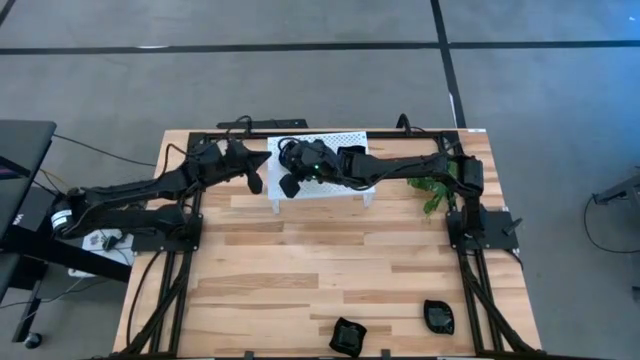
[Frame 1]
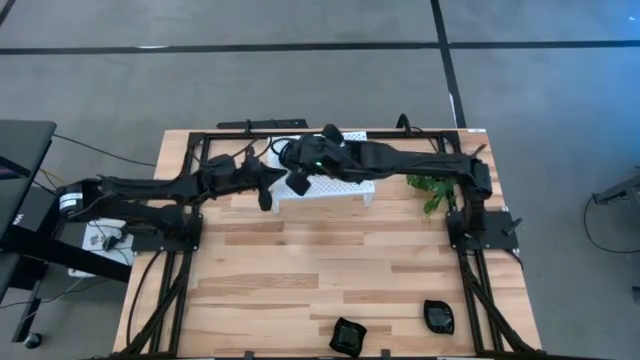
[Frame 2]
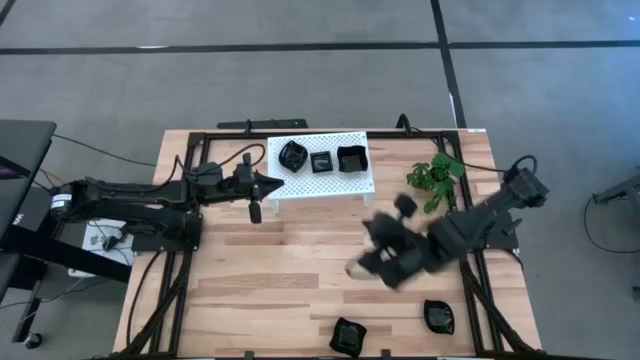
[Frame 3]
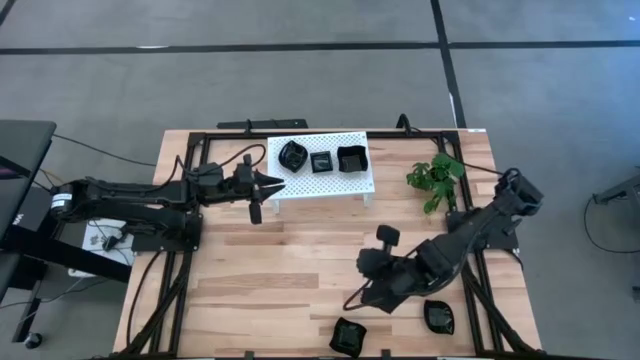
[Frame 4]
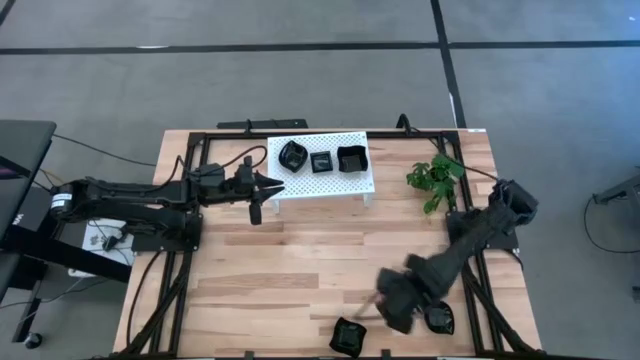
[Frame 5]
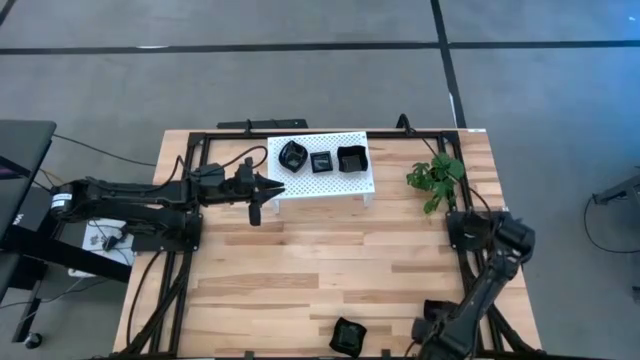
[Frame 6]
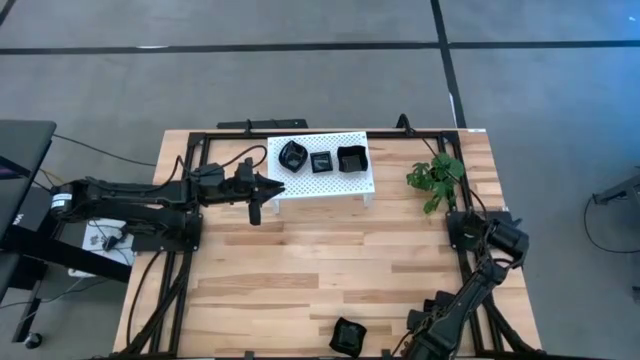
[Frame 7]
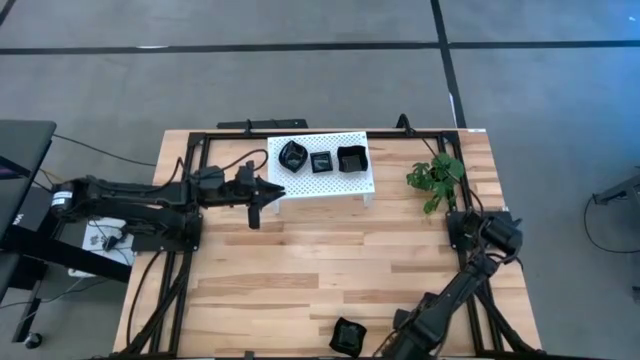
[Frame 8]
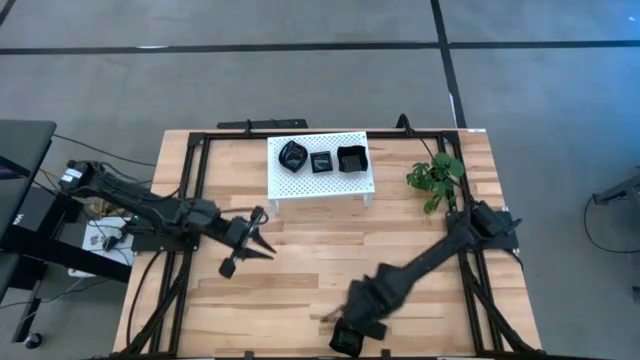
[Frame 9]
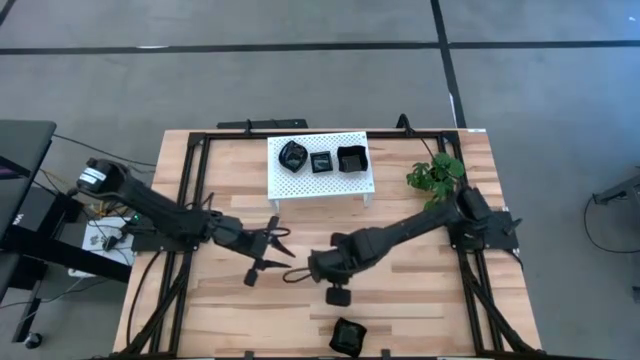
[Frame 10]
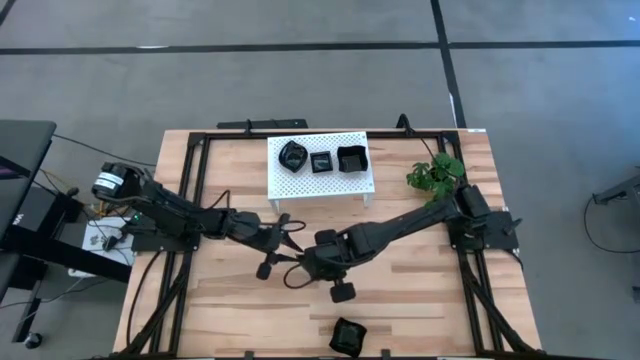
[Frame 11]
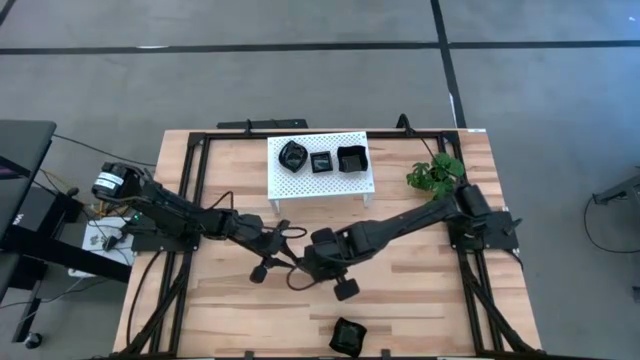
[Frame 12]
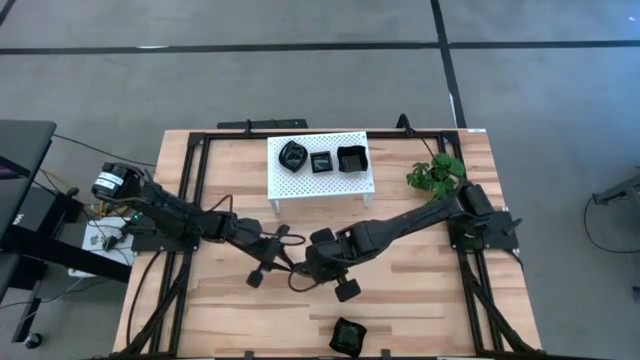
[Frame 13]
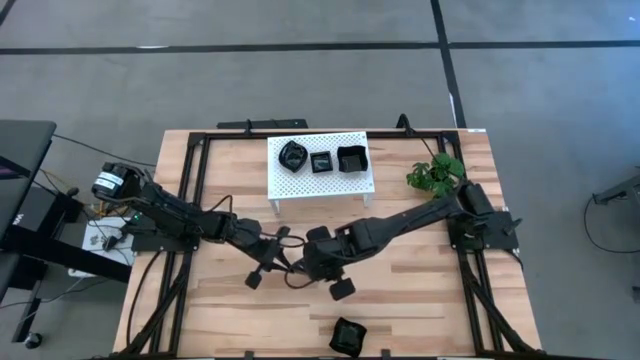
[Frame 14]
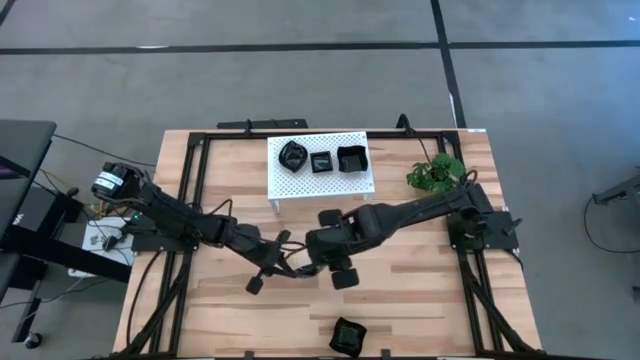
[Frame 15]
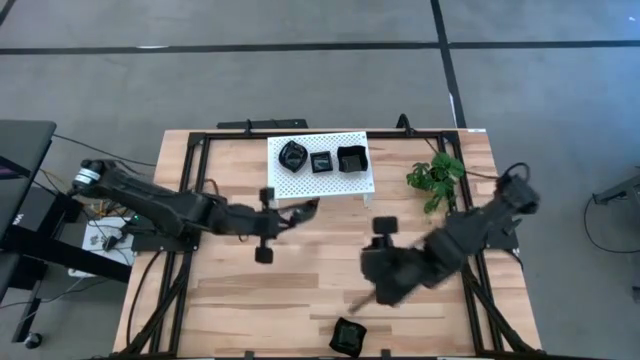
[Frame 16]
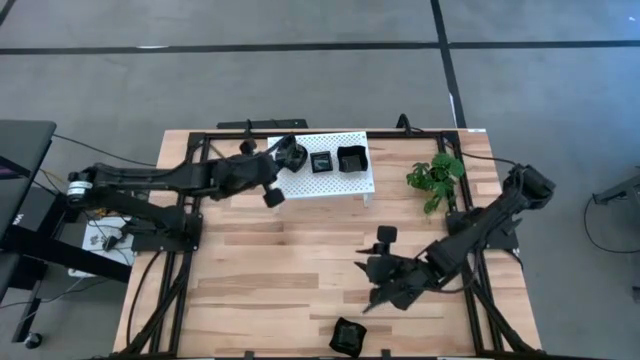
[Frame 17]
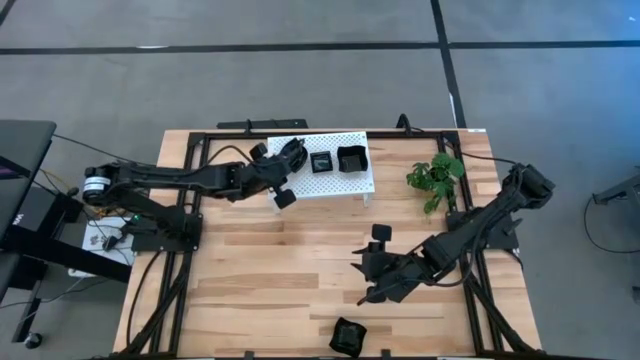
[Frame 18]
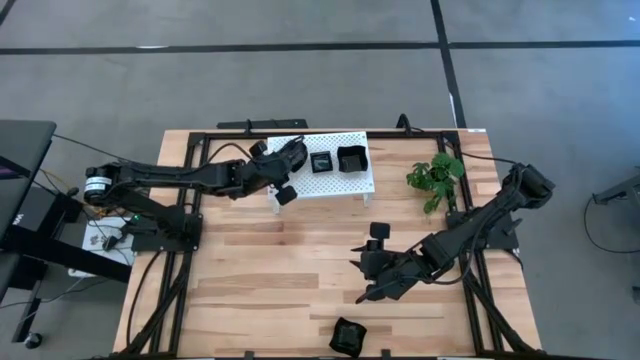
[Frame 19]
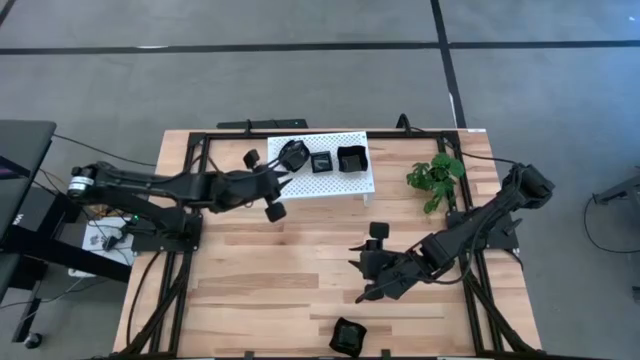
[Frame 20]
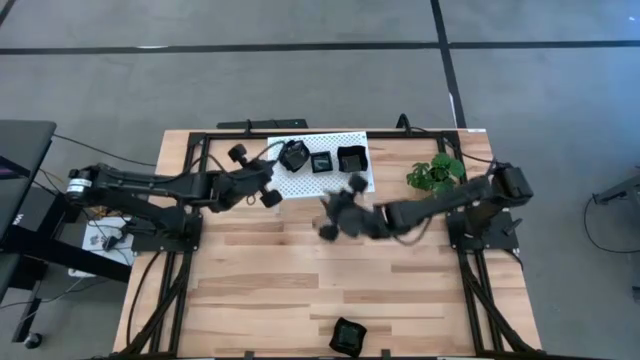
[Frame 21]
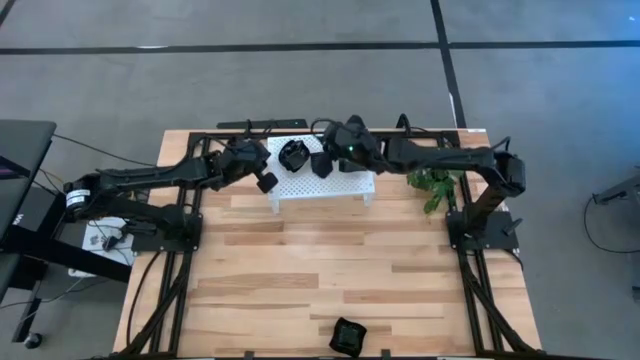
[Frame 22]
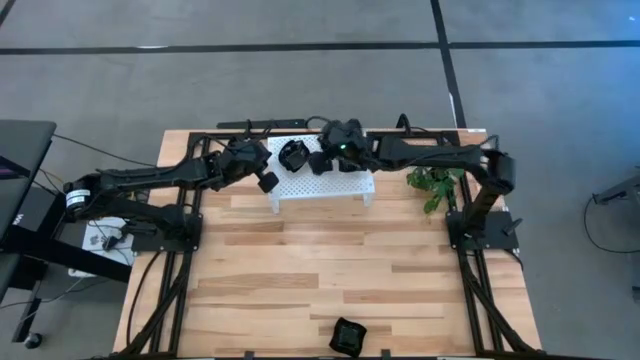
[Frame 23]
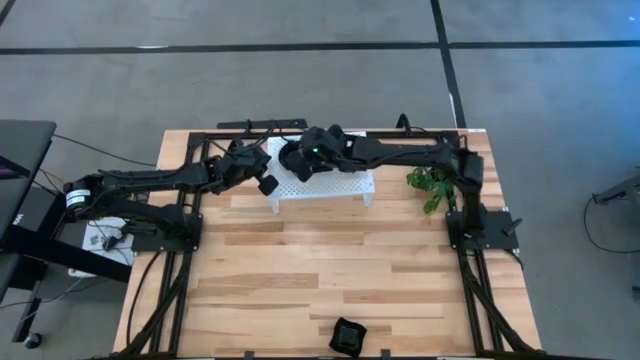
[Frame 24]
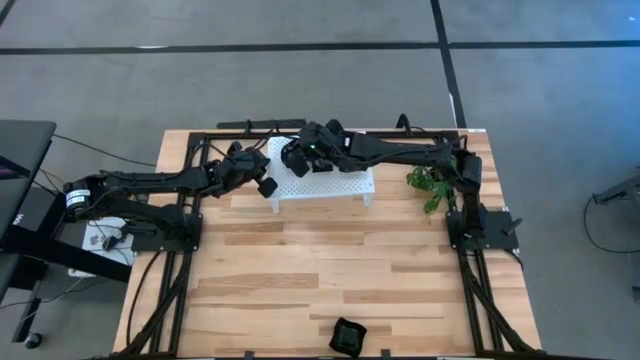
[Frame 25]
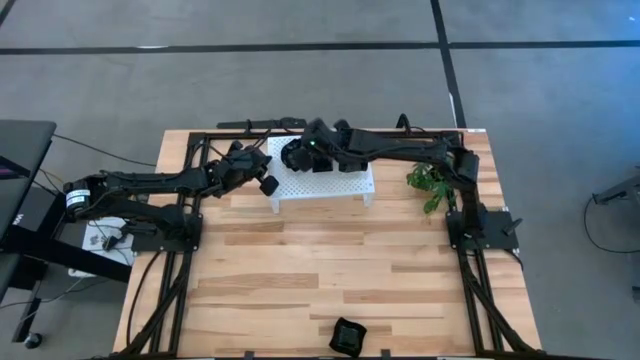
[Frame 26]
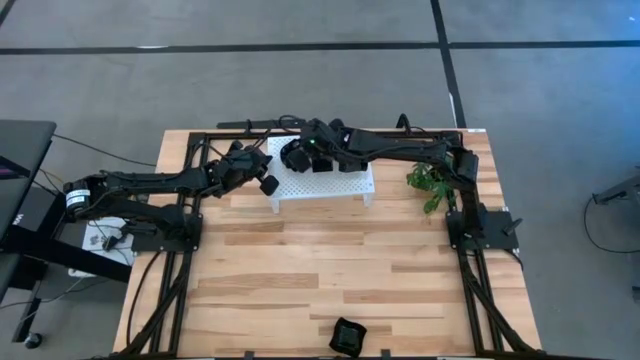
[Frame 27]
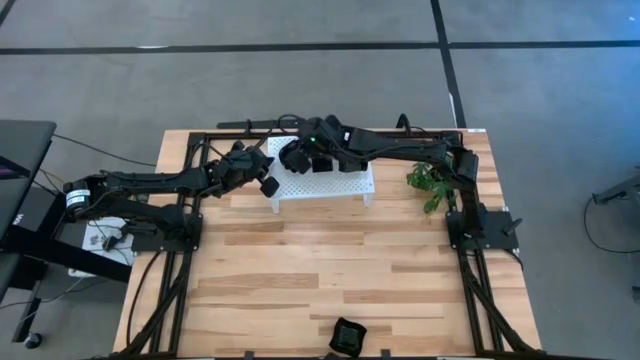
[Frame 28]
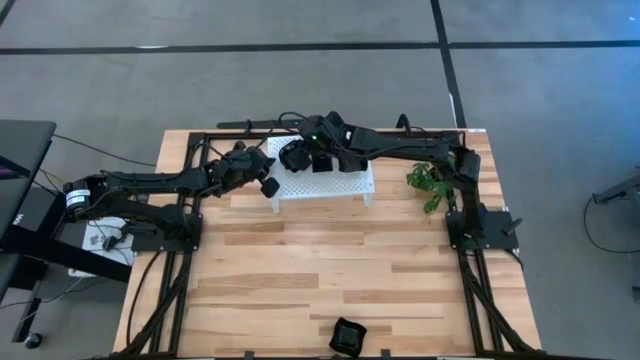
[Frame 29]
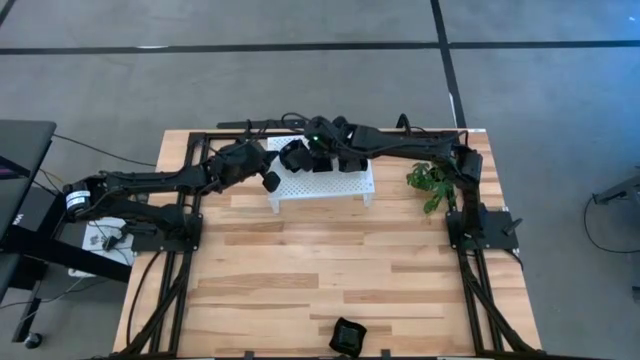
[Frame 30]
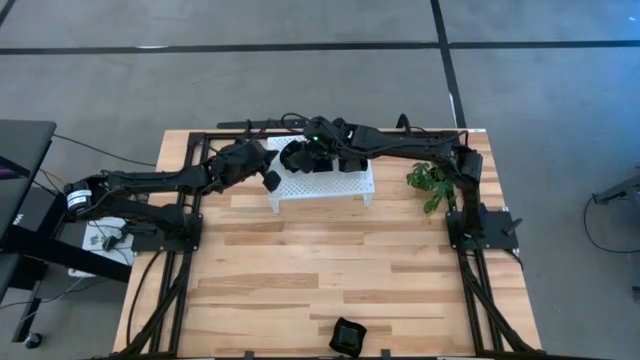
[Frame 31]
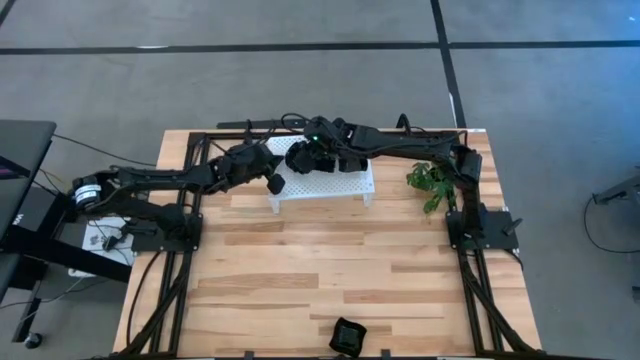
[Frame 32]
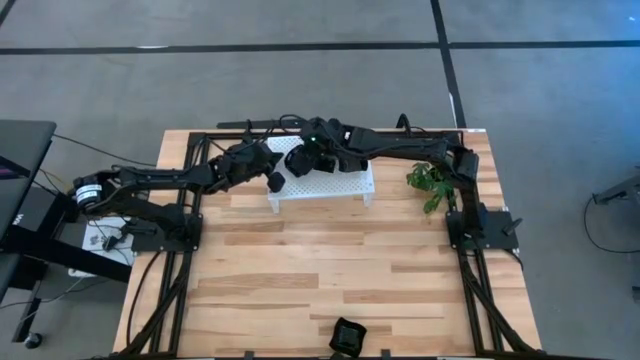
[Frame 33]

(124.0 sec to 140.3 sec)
Task: Pick & Place Mini shaped plates
Stack the leaf-shaped plate on top of the leaf-shaped plate on the shelf

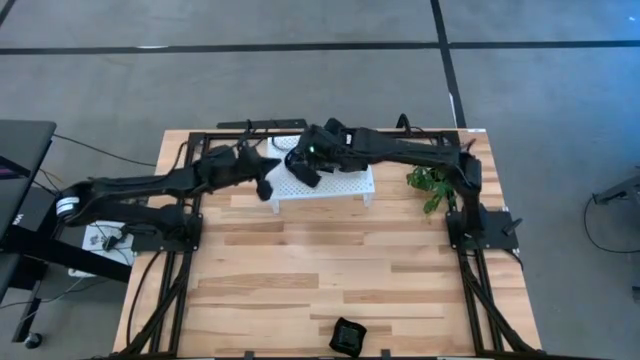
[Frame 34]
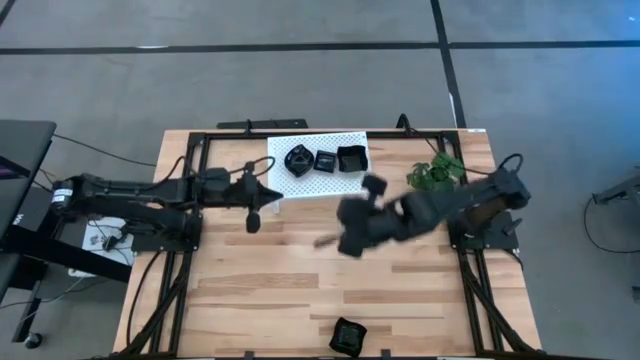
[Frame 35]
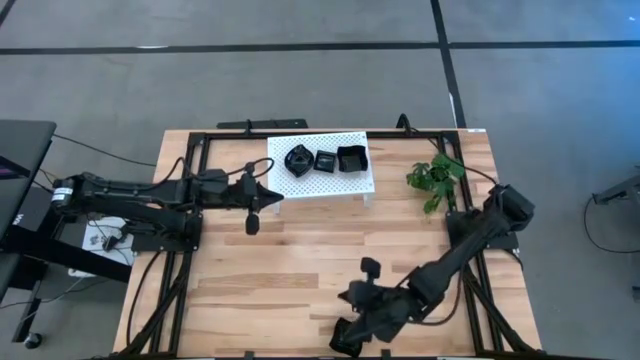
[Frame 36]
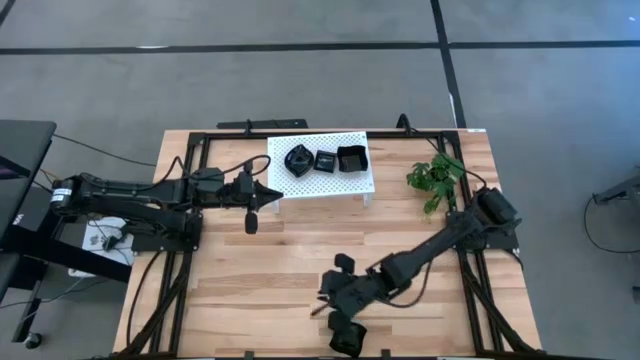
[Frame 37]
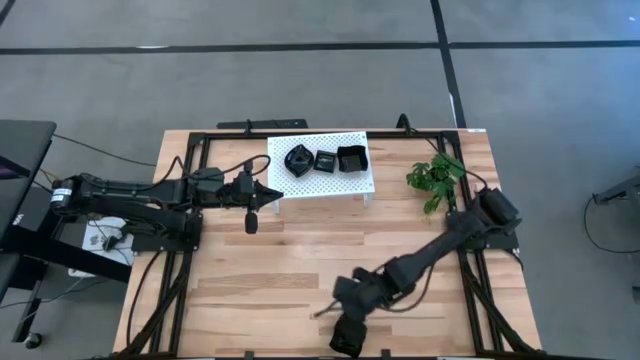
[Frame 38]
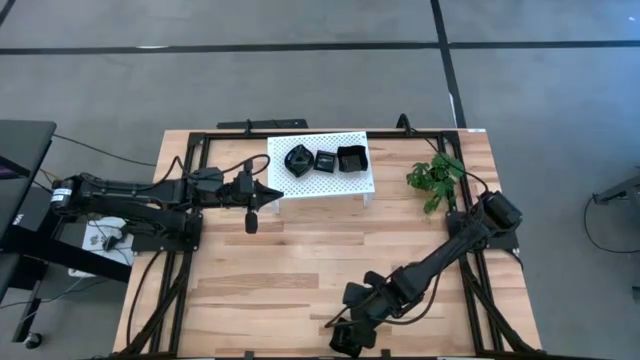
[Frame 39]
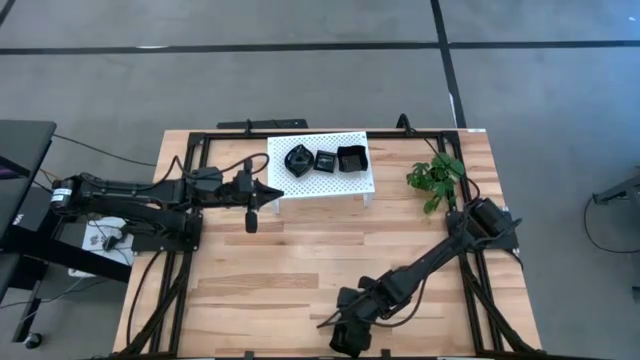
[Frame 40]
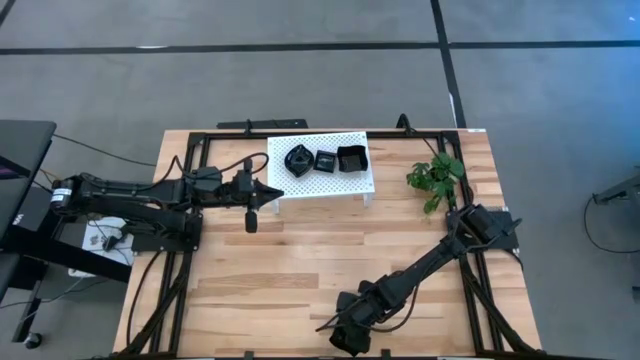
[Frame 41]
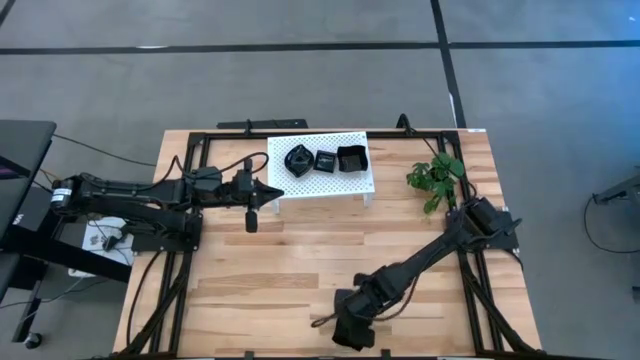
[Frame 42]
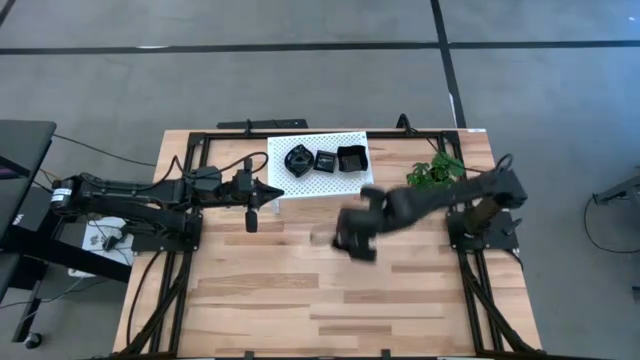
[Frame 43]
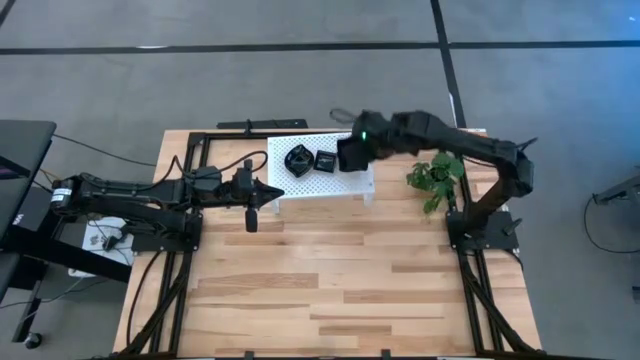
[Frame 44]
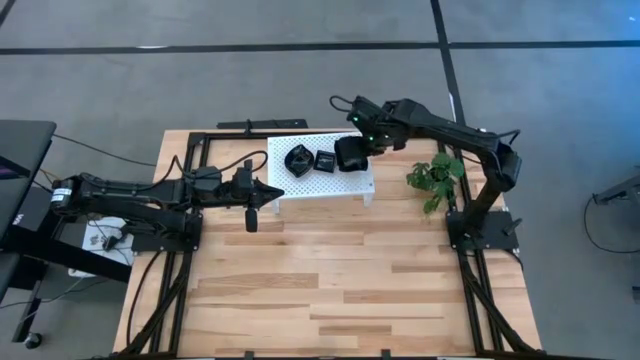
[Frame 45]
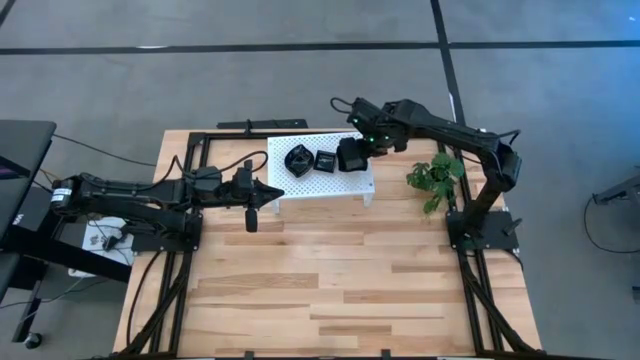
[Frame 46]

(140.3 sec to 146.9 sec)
Stack the distorted square plate on top of the distorted square plate on the shelf
